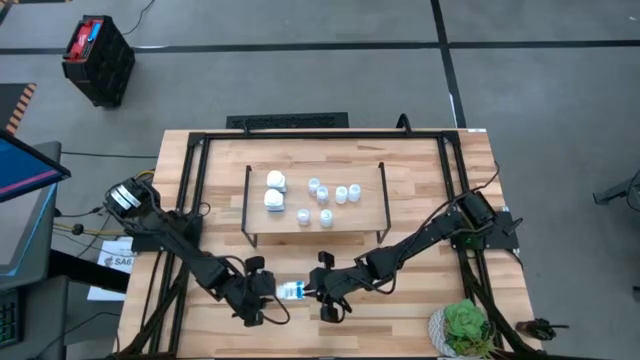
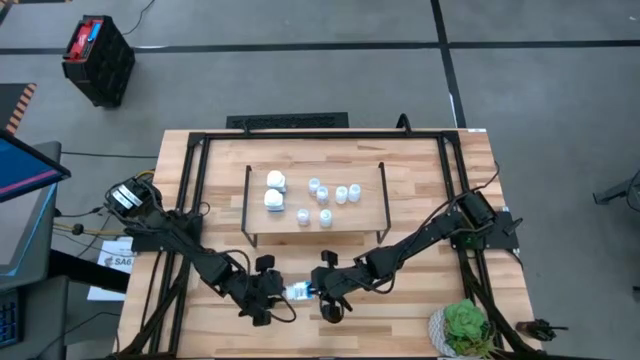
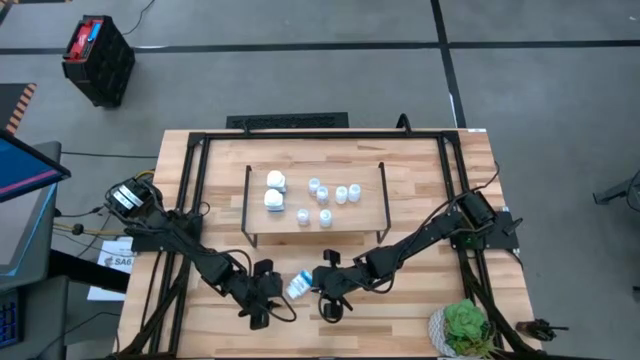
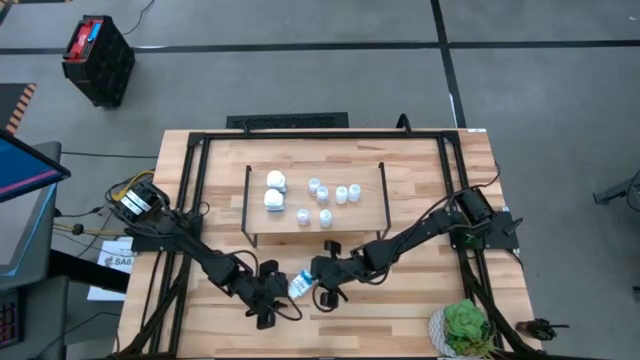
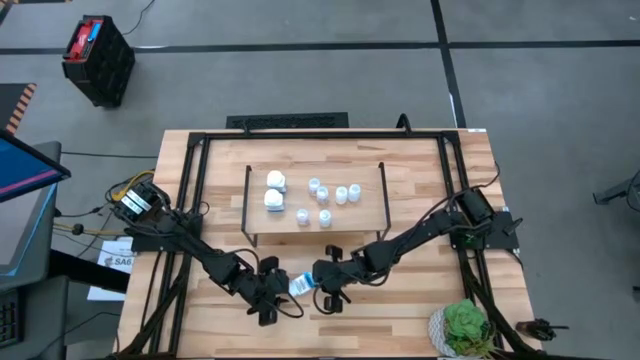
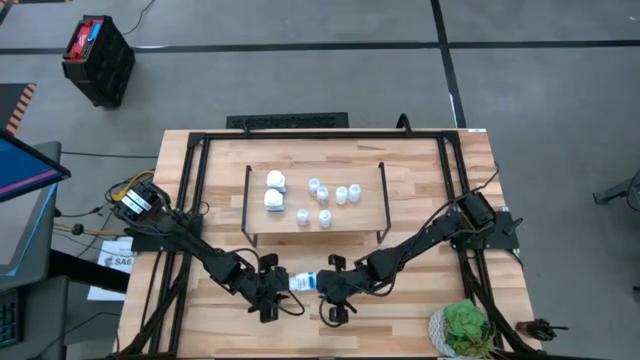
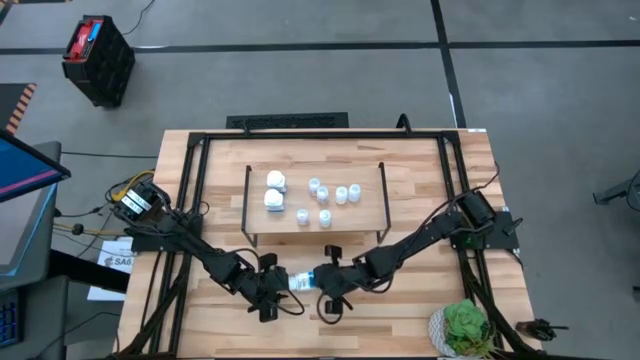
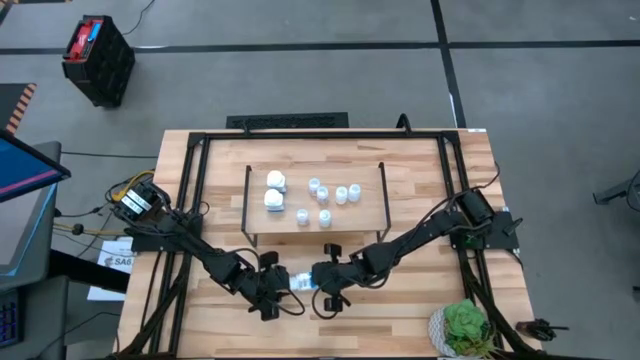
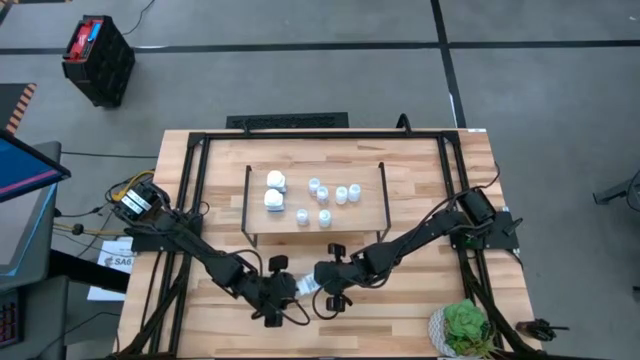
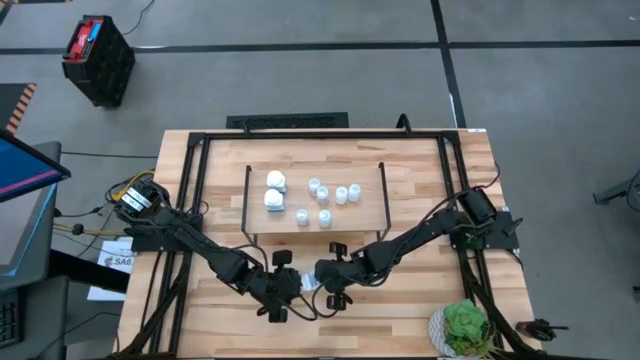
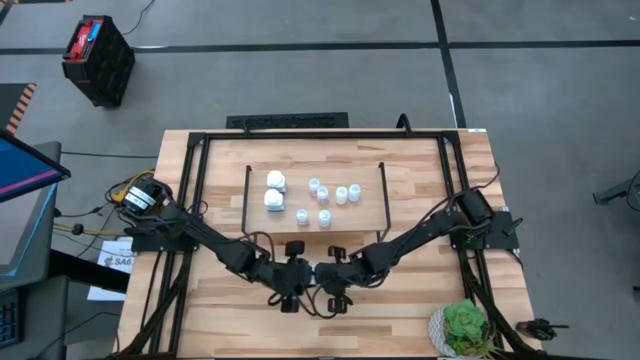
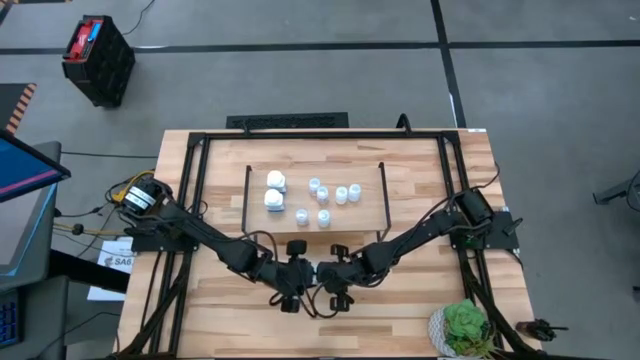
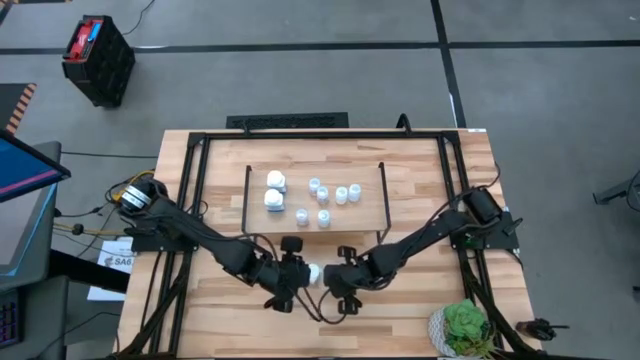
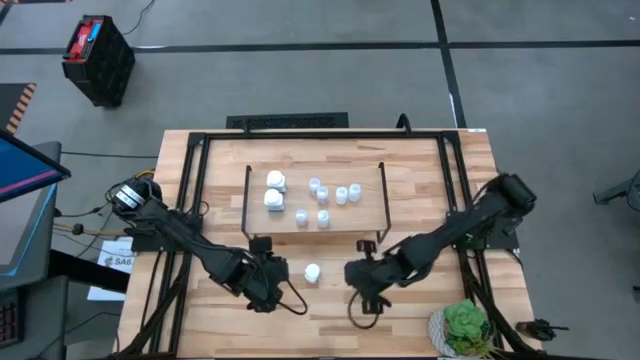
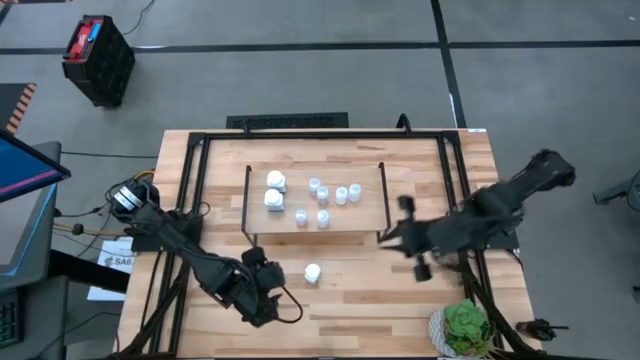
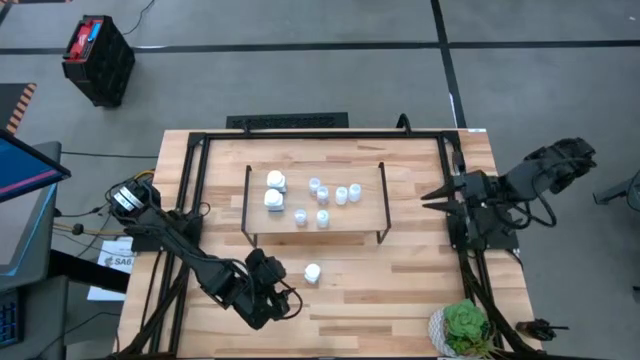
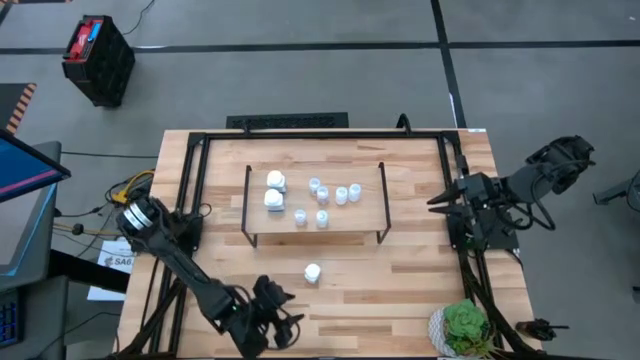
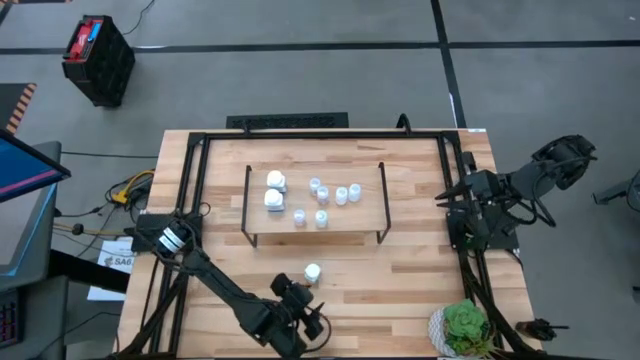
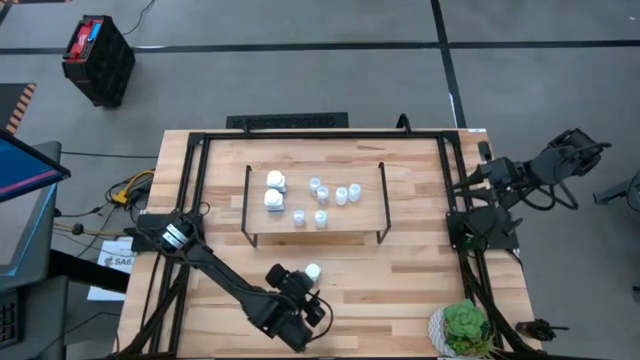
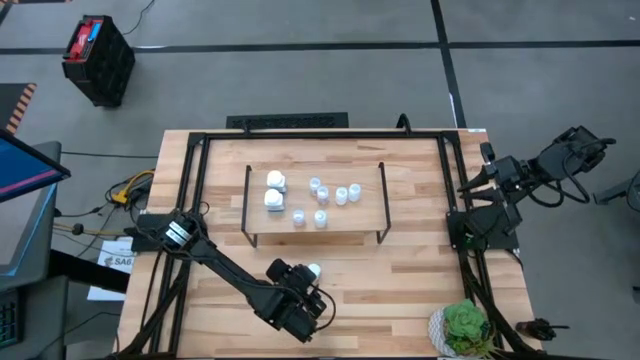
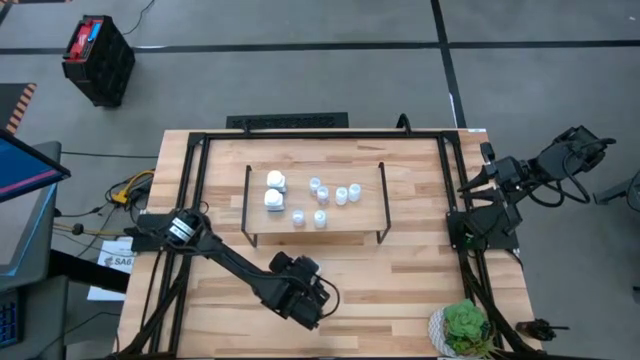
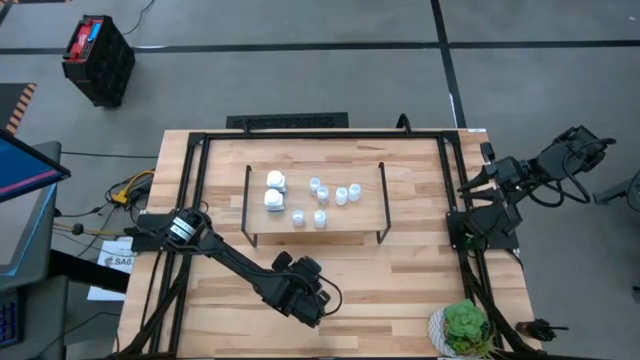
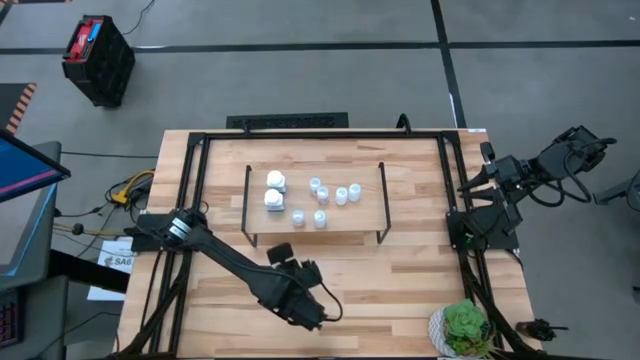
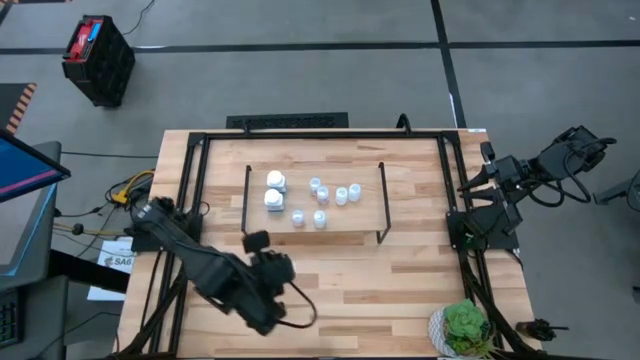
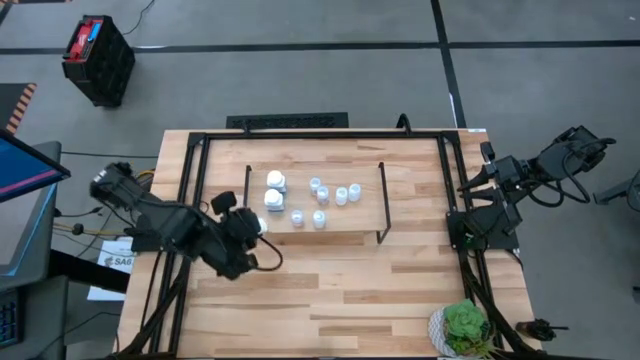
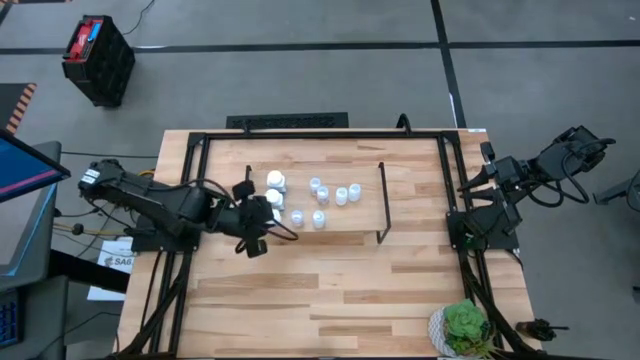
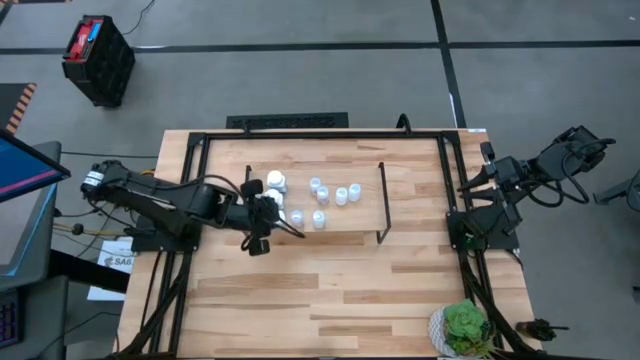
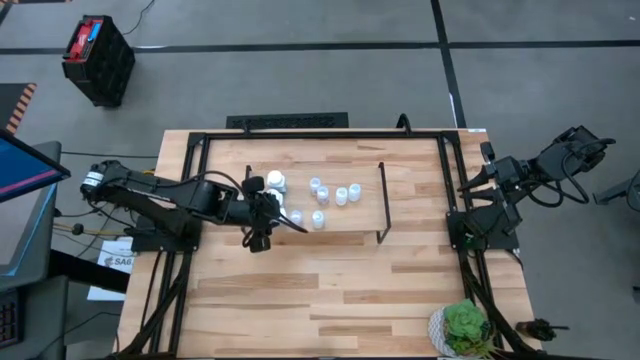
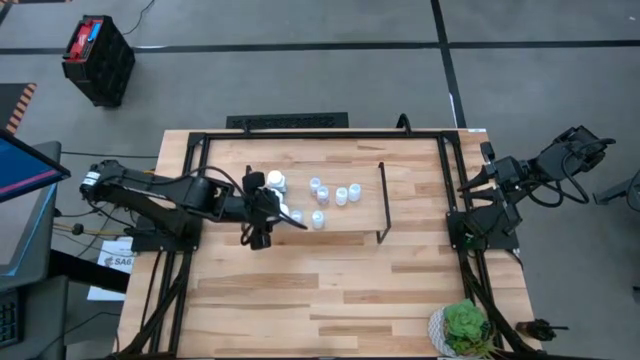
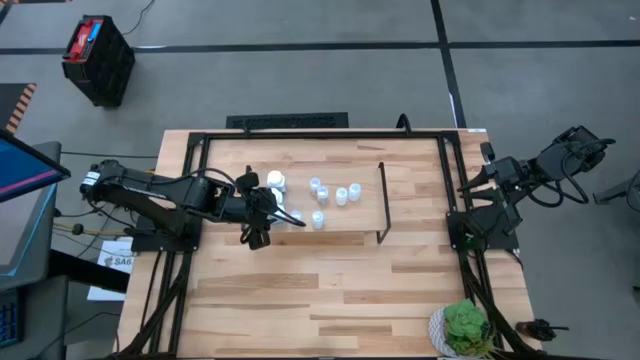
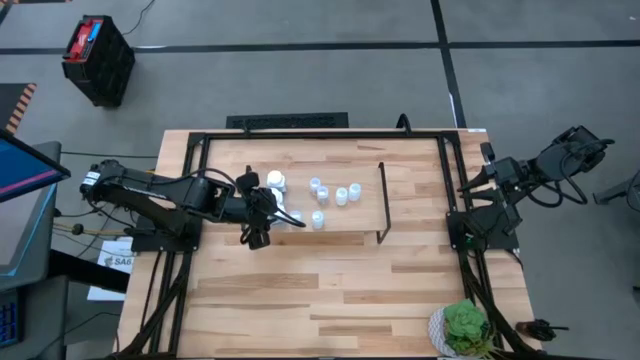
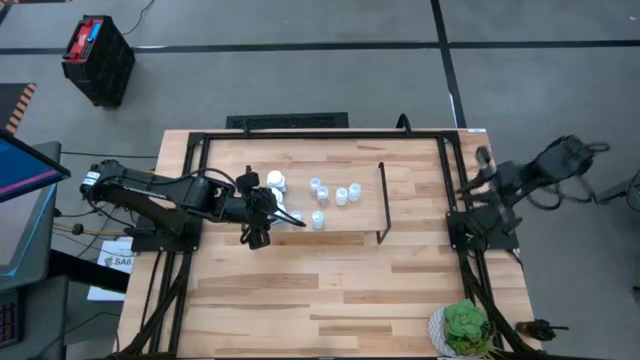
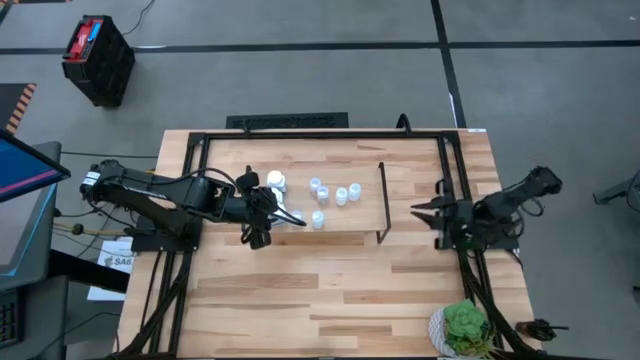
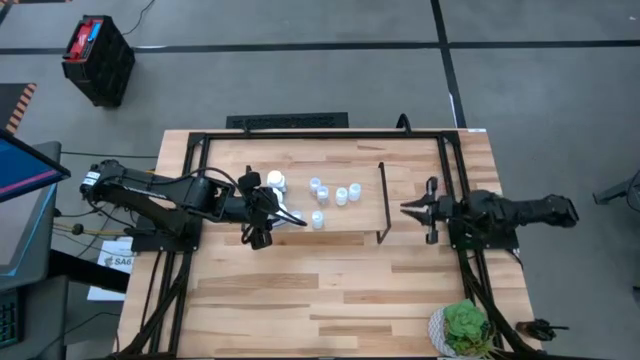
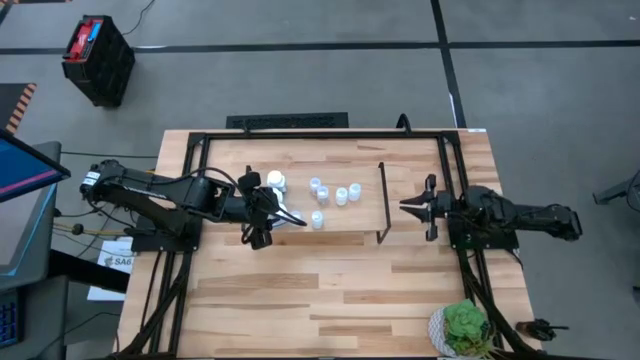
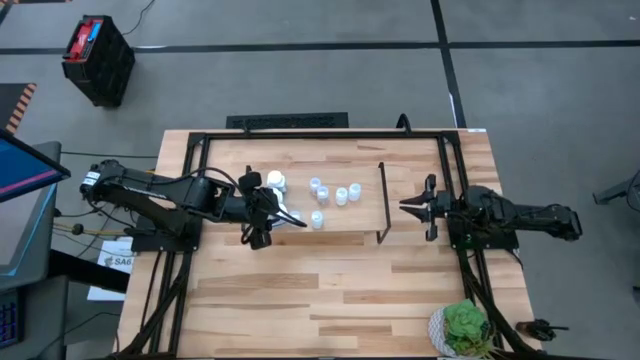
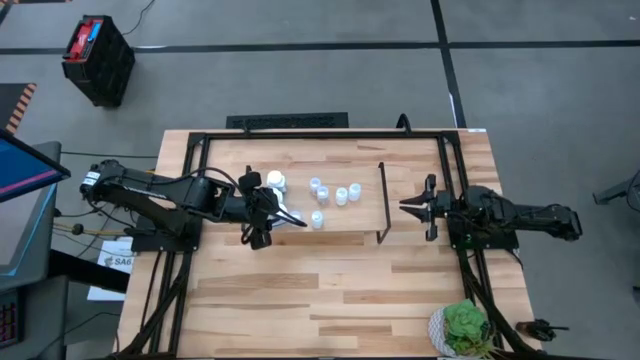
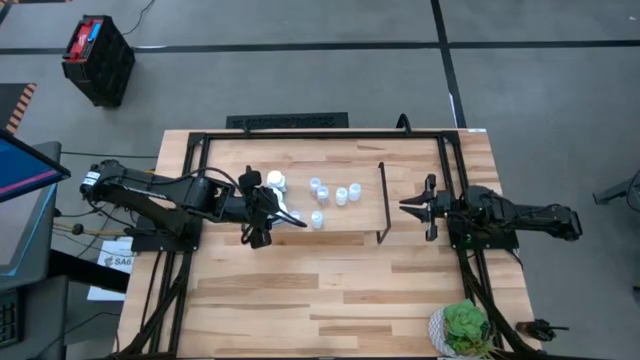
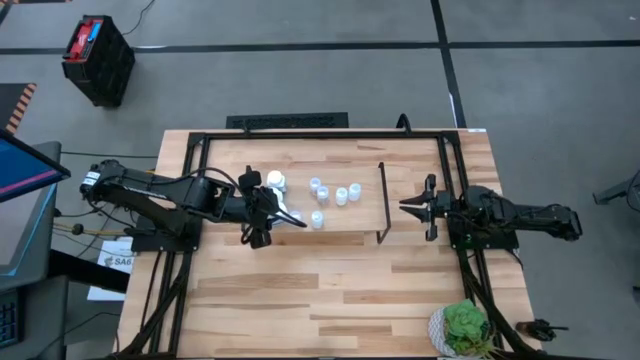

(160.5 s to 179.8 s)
Task: Pick and place medicine bottles onto shelf by color
Put the white blue pill bottle on the shelf

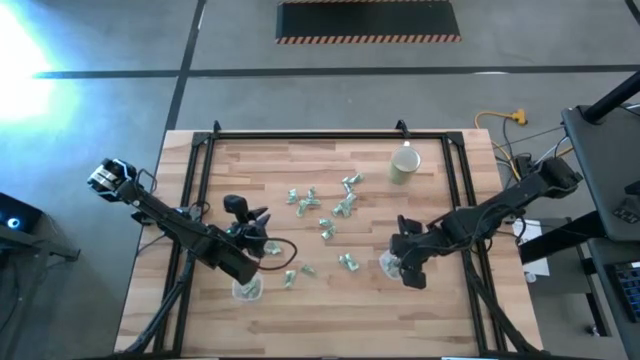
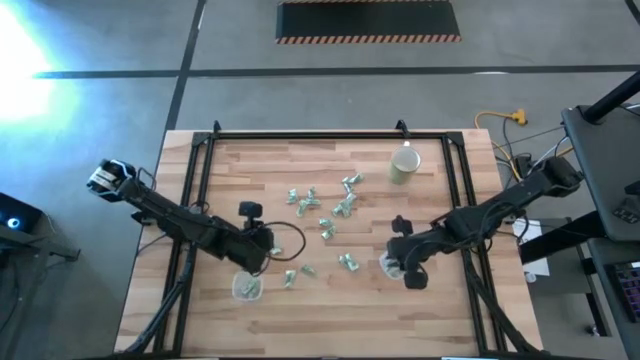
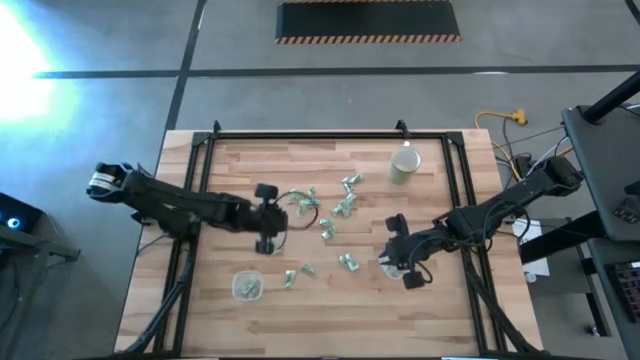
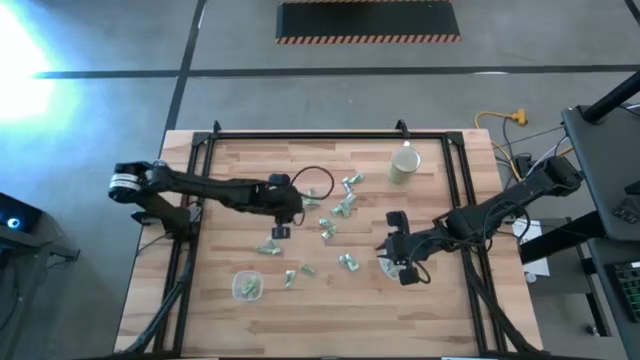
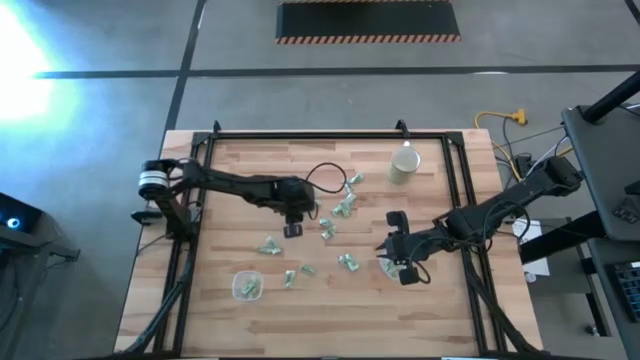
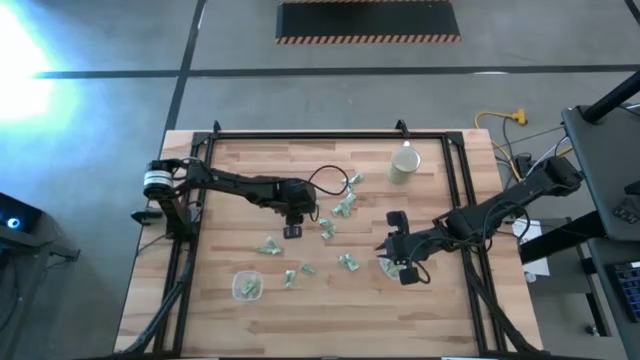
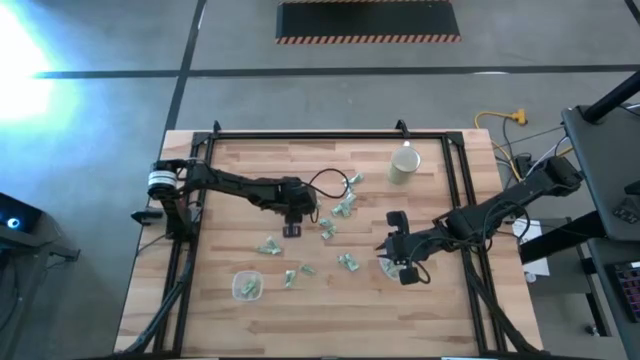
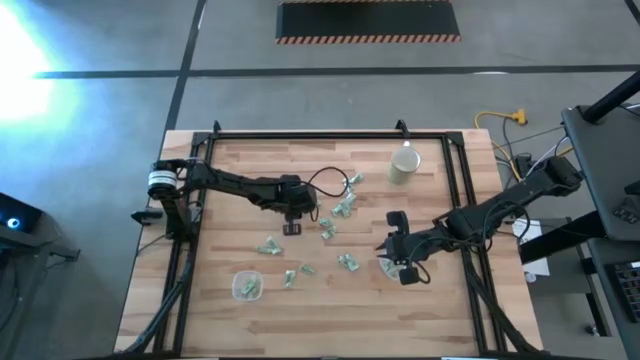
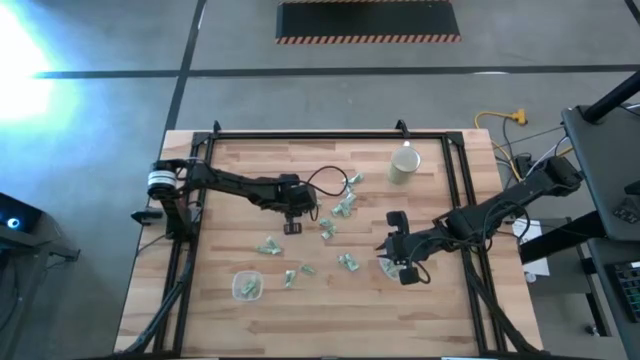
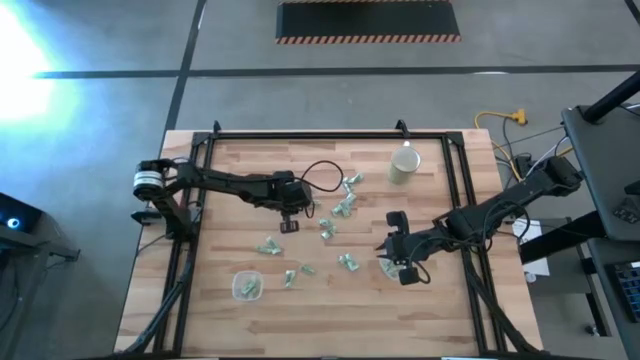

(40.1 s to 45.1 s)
Task: Pick and place Stevia / Truvia into bins
Put the stevia packet into the left transparent container
